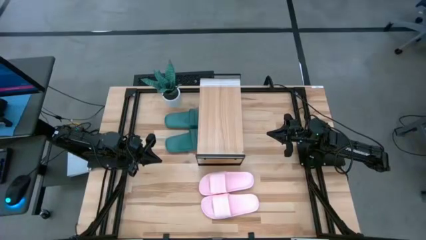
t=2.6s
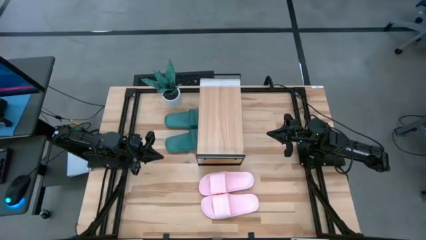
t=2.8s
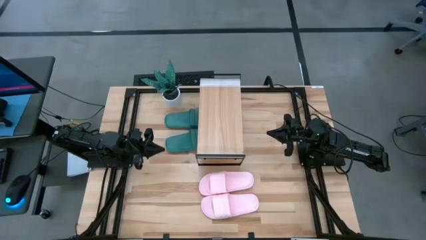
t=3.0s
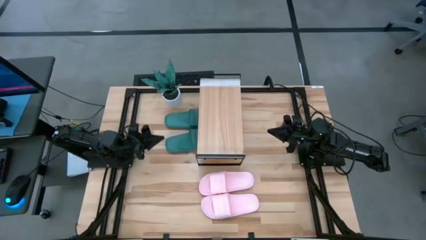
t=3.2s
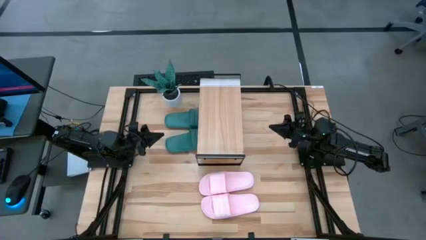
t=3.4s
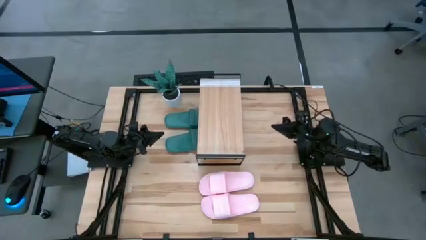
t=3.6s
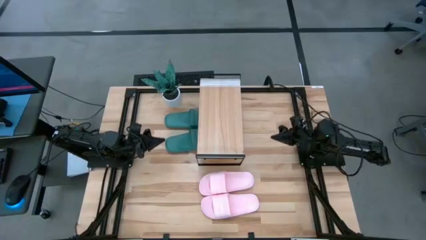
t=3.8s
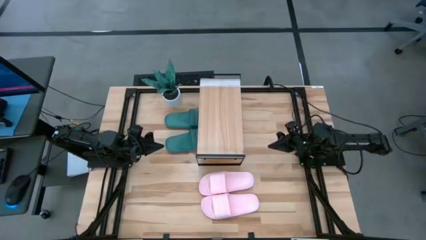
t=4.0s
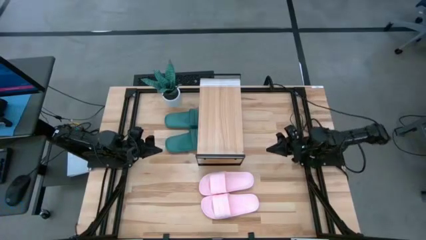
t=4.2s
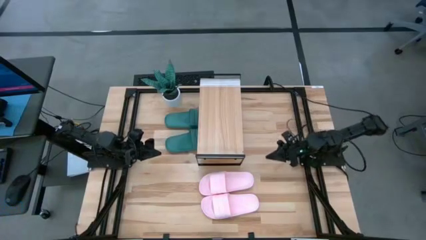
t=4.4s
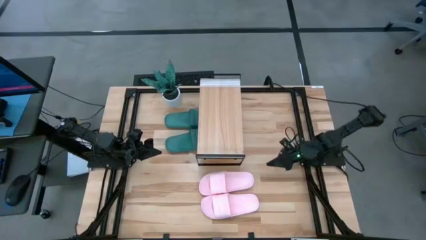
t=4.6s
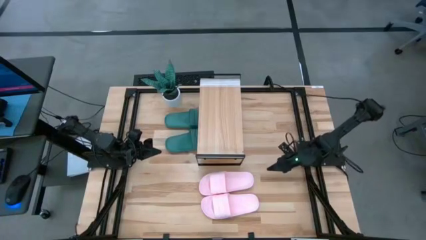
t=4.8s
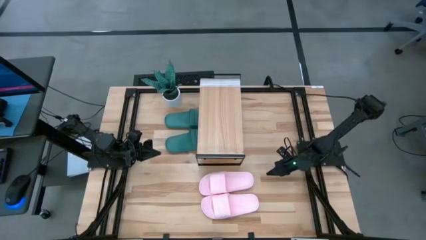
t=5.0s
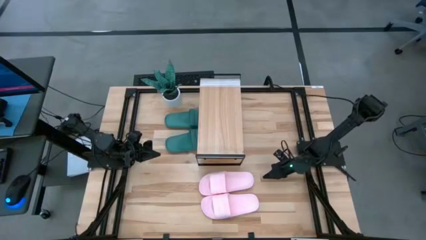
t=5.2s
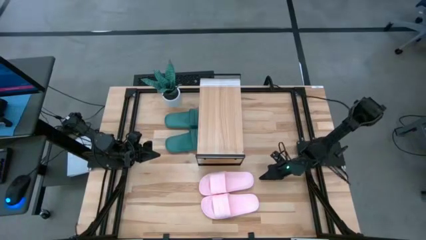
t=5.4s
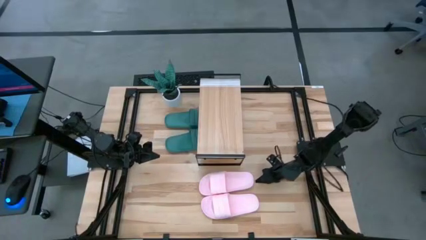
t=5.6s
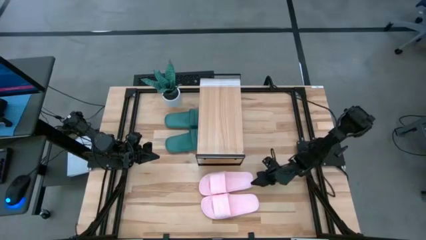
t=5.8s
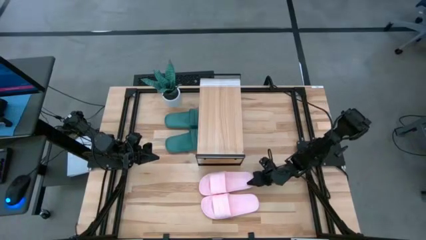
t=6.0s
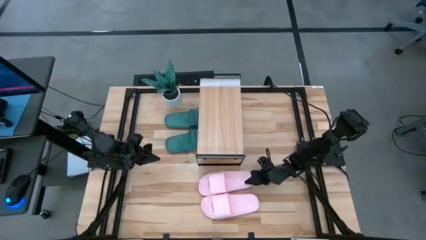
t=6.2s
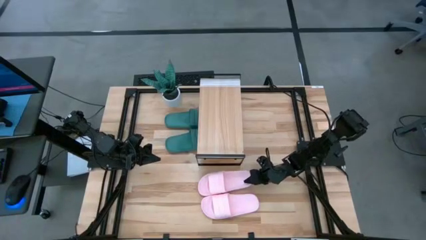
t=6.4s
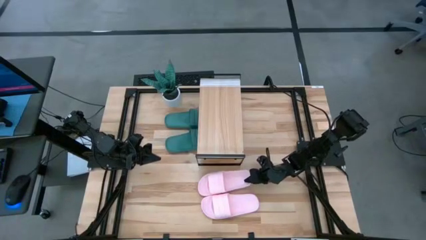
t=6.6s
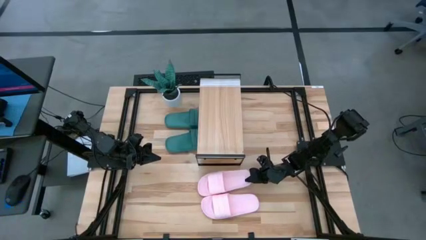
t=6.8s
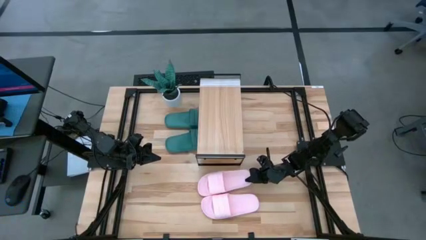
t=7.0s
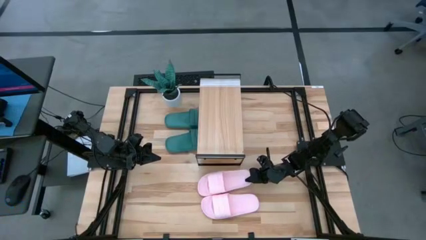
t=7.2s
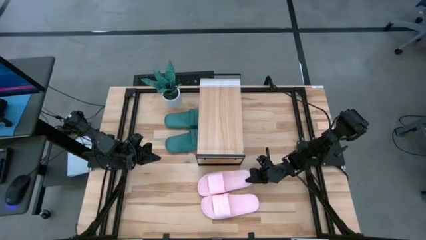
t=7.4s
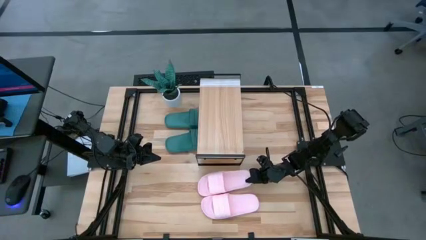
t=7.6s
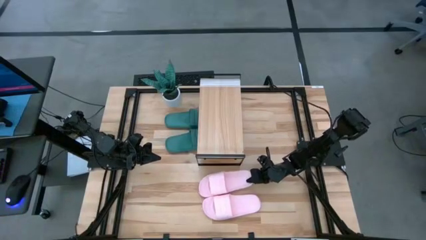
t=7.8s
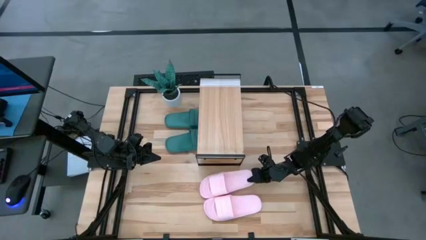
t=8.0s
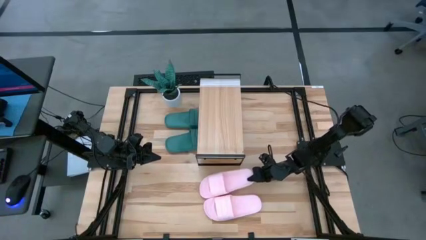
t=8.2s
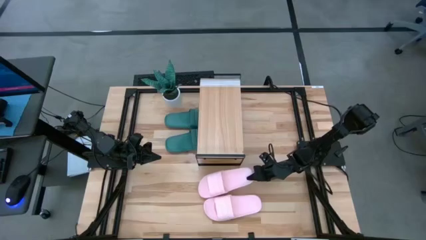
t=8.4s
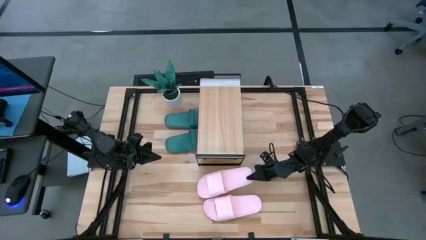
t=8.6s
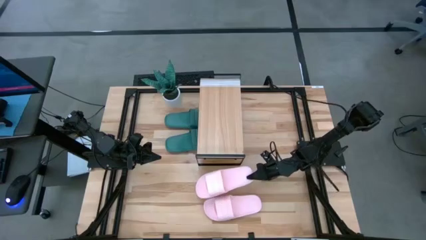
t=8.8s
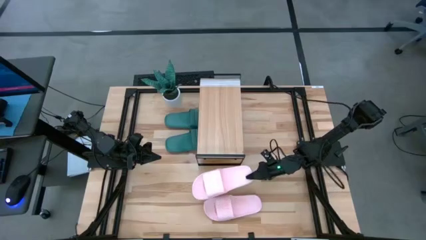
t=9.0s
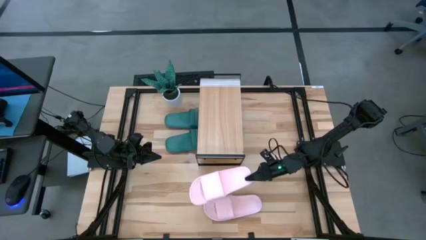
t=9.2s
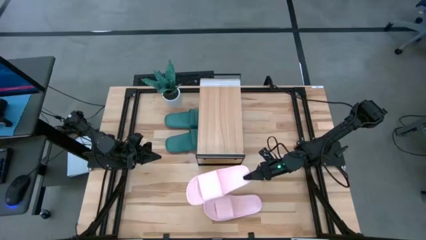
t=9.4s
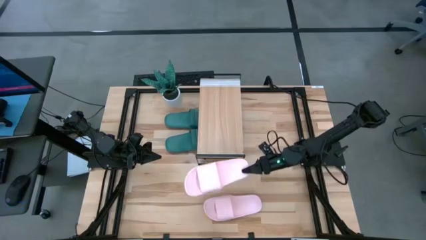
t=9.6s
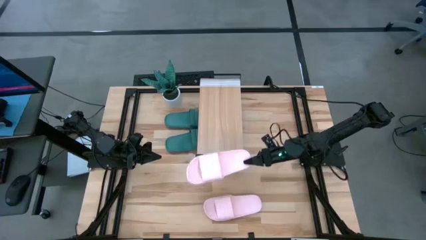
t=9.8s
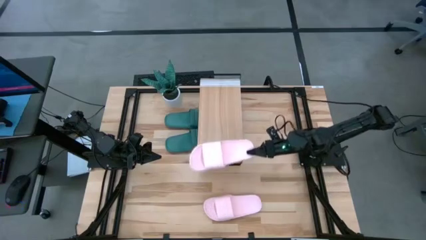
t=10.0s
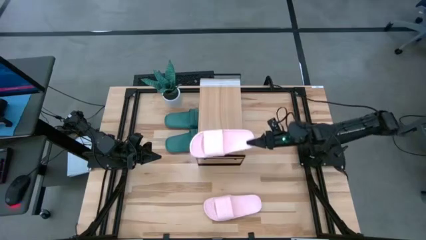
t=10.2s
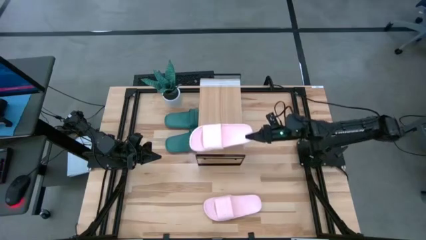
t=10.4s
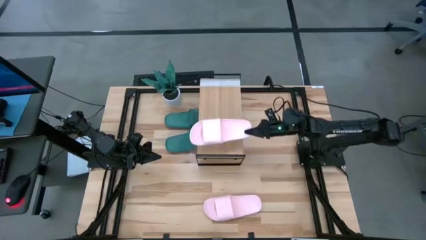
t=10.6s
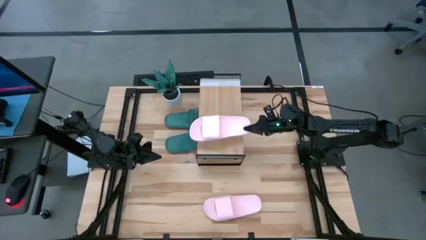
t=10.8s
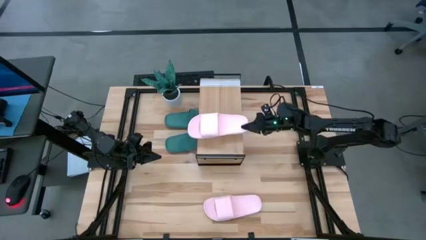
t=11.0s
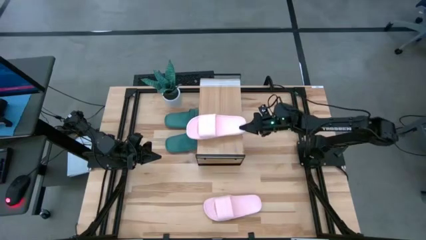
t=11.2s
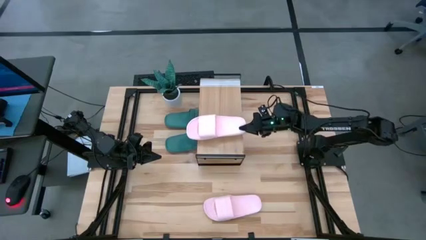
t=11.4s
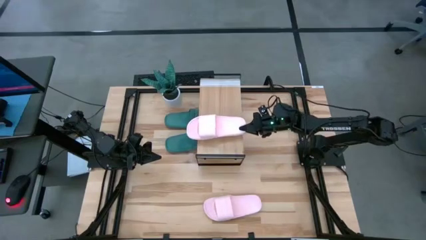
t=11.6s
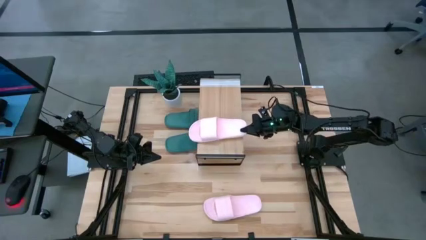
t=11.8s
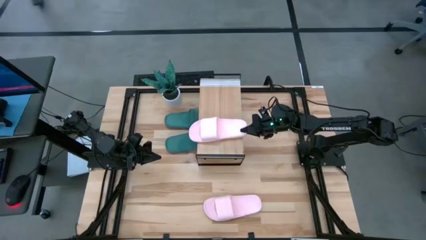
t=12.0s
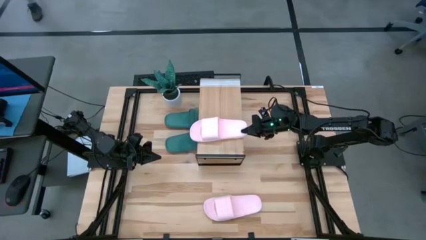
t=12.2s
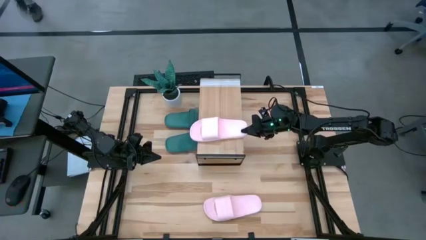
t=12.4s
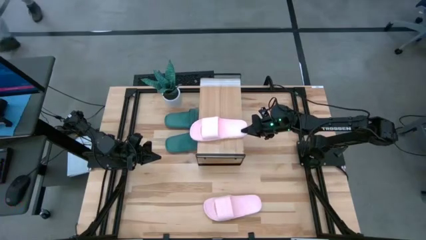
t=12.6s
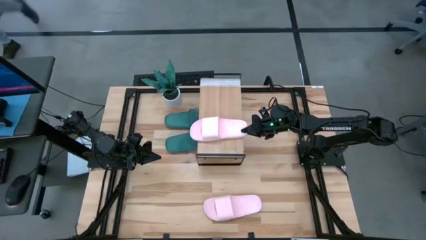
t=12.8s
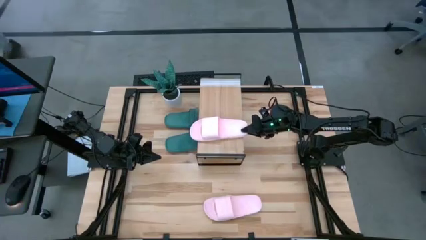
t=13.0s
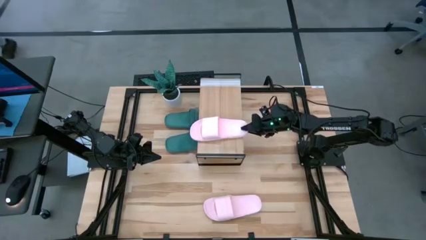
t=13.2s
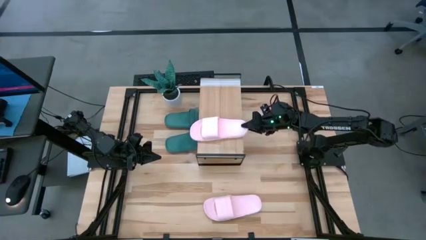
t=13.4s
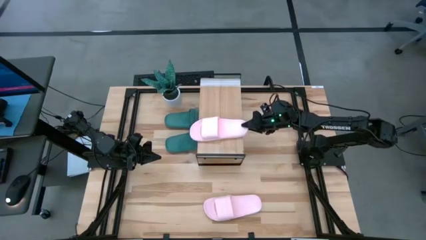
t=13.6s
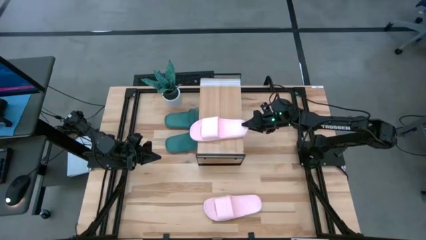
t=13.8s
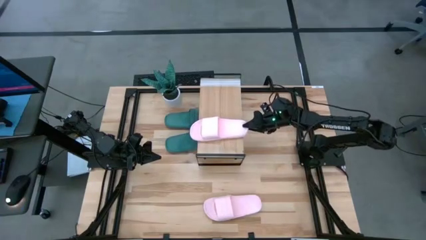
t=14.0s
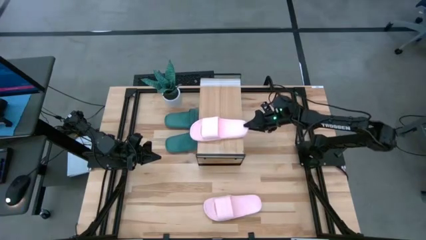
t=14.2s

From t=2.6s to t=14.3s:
Task: Pick and place slides into the shelf
Put the top pink slipper on the shelf

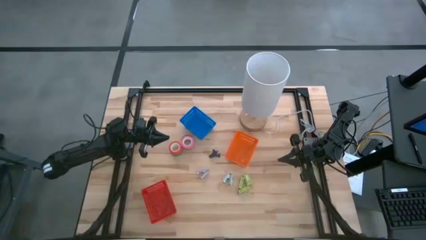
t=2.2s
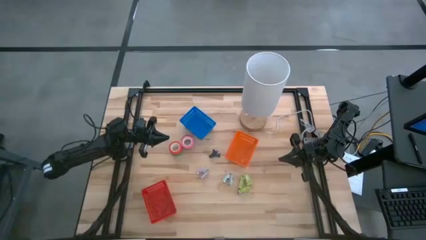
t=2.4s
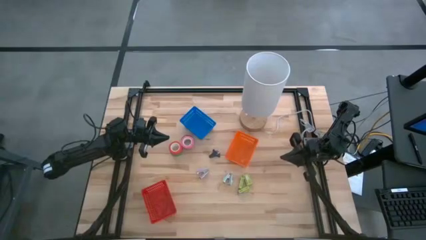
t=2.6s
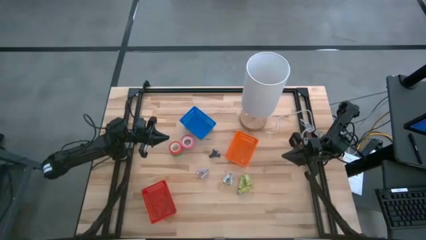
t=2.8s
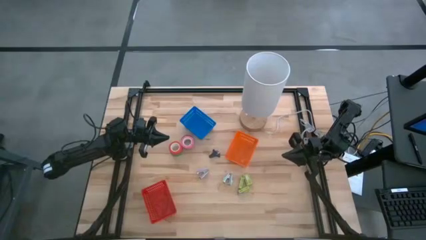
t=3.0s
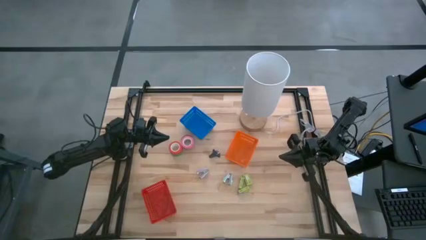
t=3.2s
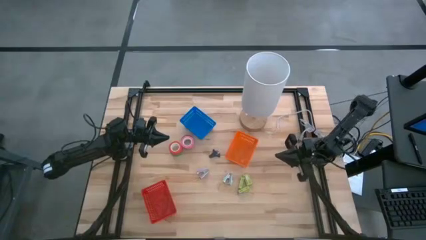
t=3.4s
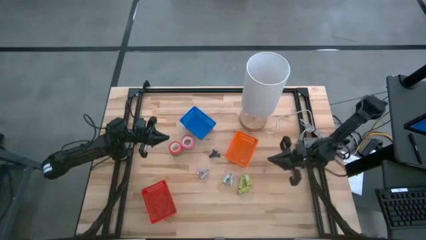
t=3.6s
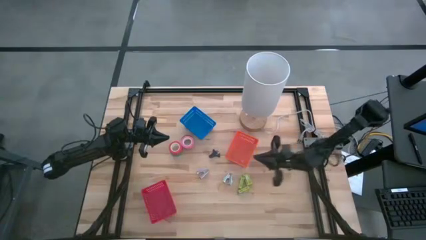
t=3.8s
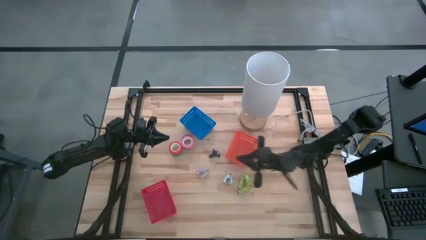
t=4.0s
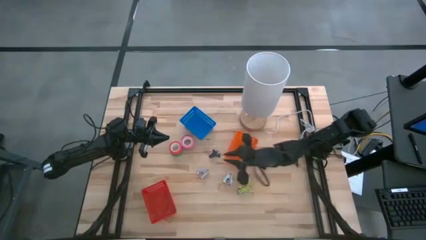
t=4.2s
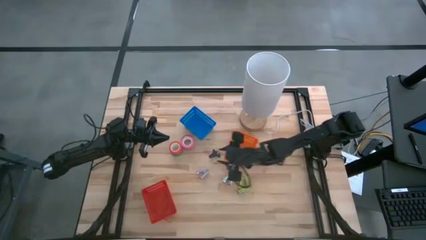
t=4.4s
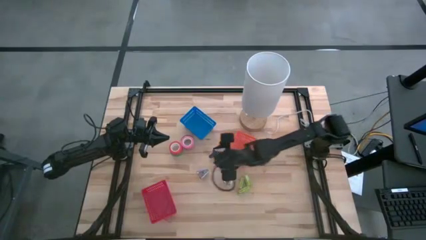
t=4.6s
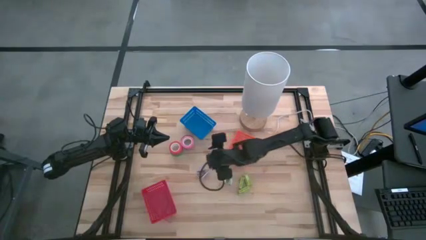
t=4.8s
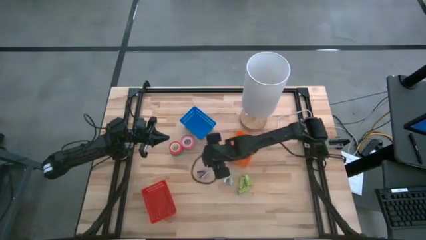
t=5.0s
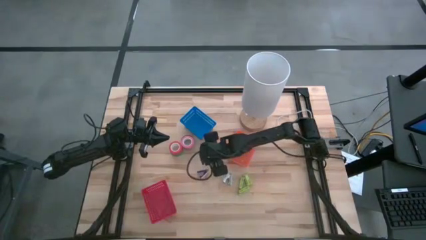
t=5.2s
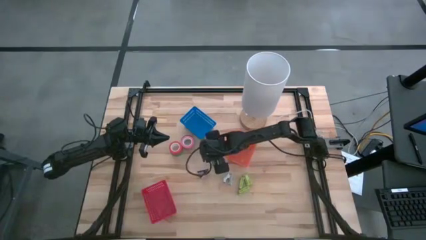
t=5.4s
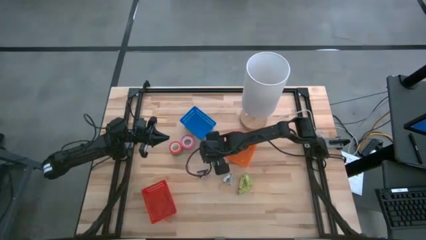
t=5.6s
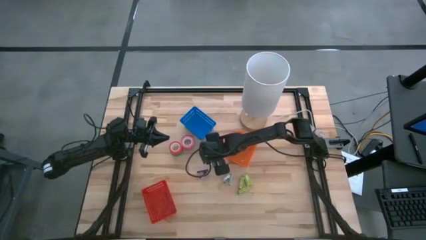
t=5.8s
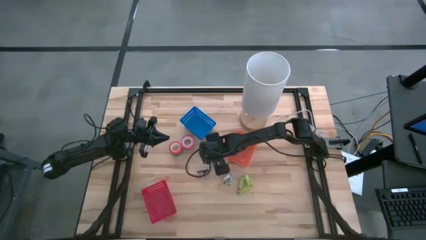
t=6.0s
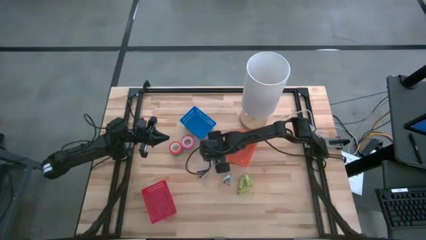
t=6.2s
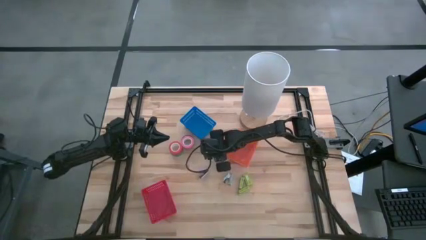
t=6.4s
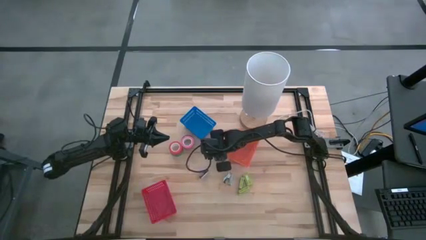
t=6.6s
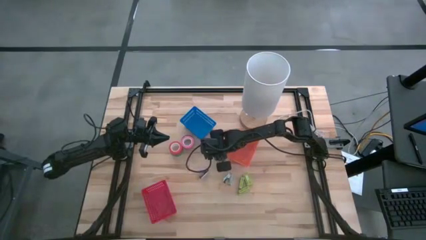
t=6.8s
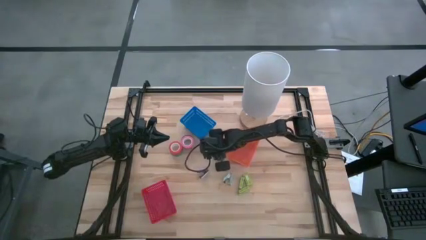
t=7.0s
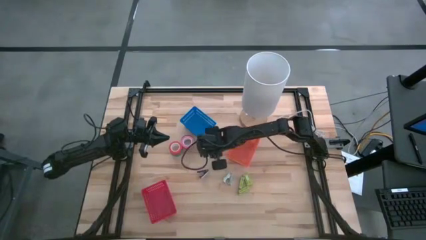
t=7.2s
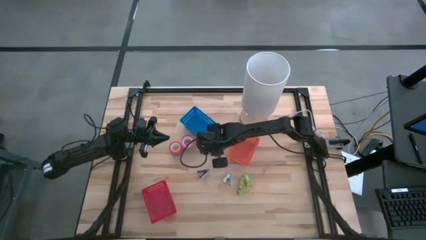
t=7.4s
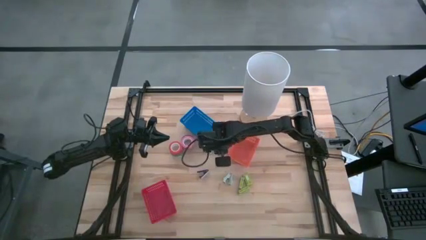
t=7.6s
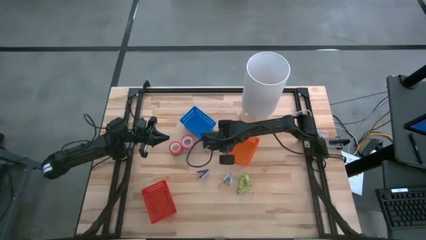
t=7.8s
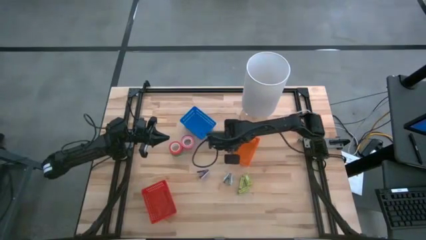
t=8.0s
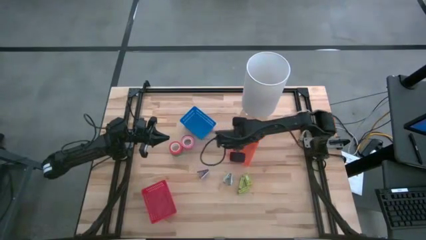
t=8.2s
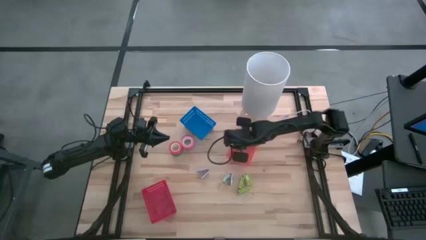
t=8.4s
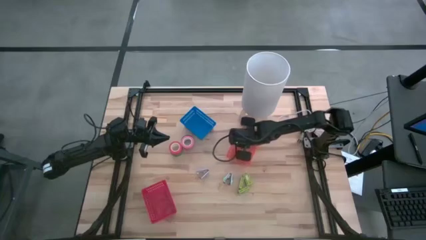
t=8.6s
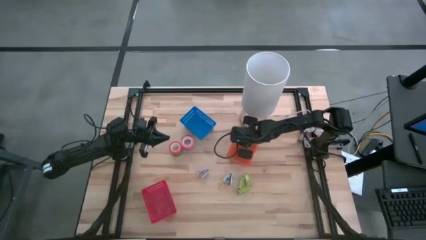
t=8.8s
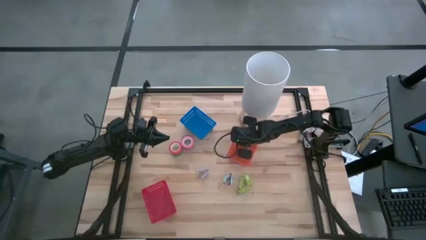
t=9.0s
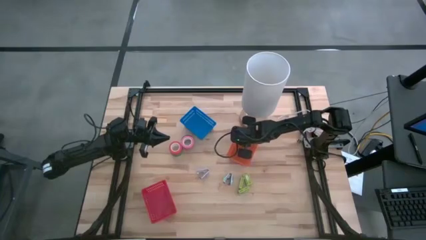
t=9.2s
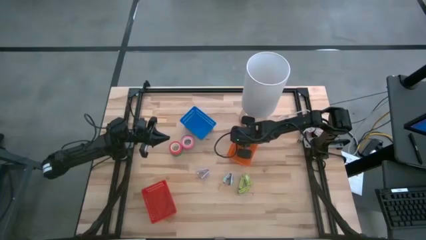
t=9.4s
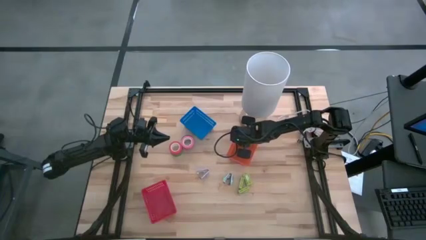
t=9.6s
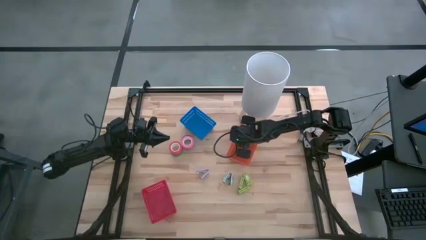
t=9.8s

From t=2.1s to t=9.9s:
Task: Pick and place Stapler, Stapler remover, tape
Put the black staple remover into the orange basket
